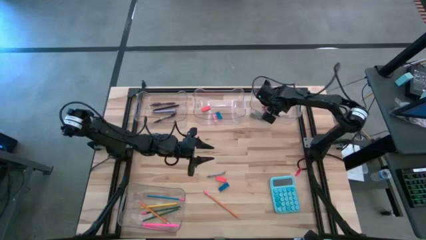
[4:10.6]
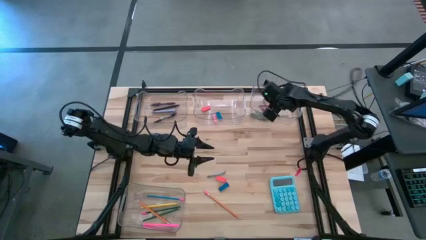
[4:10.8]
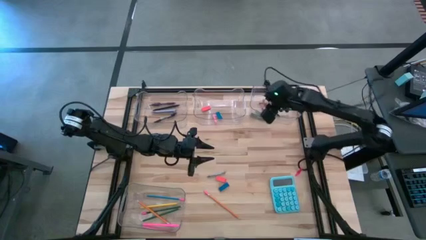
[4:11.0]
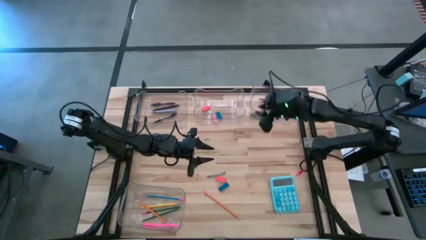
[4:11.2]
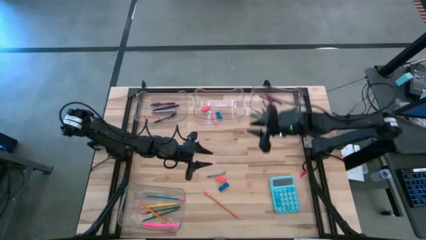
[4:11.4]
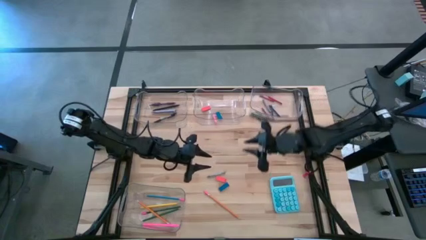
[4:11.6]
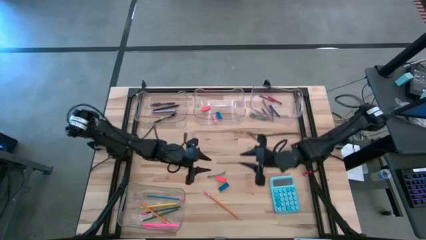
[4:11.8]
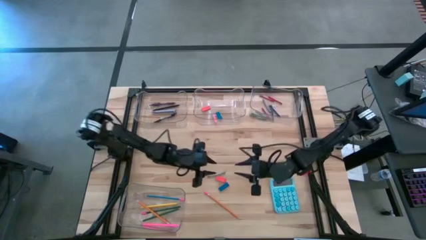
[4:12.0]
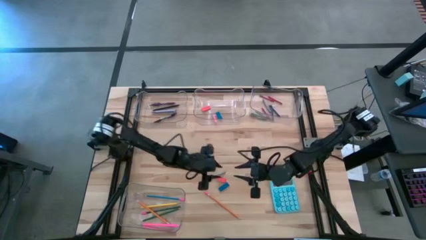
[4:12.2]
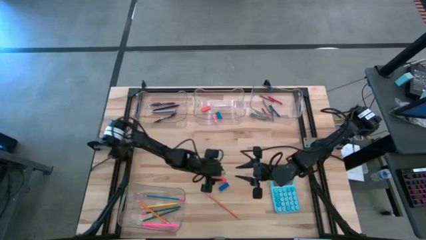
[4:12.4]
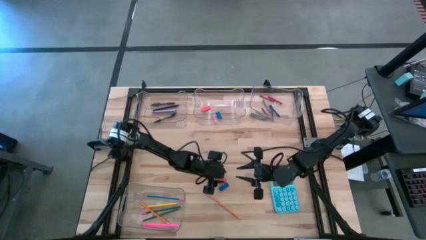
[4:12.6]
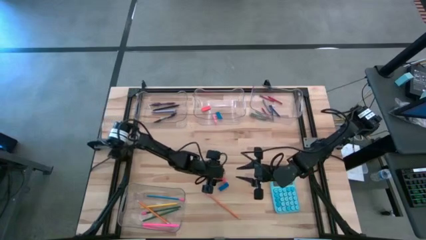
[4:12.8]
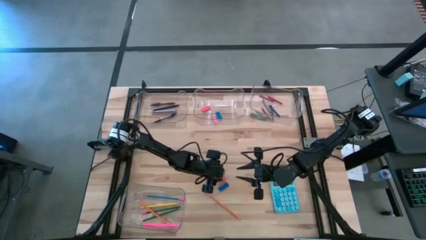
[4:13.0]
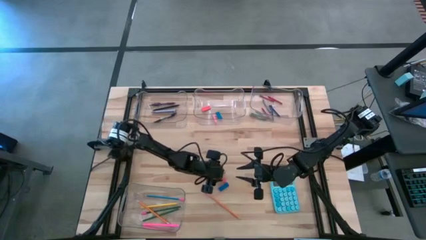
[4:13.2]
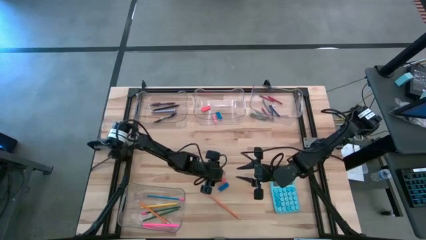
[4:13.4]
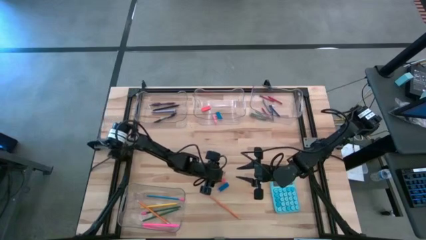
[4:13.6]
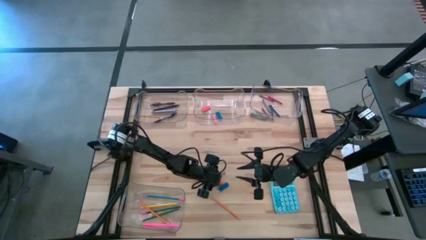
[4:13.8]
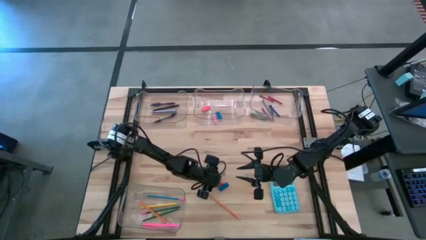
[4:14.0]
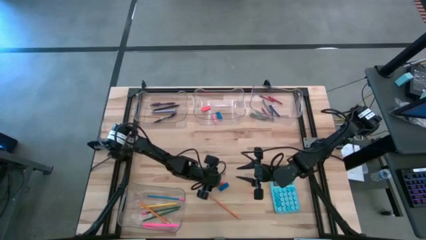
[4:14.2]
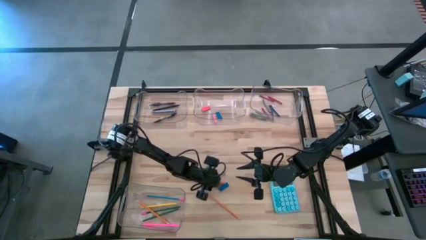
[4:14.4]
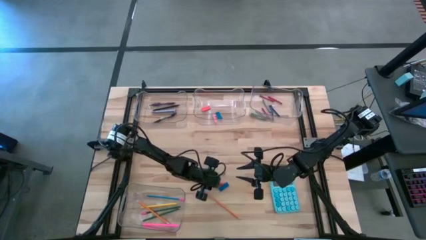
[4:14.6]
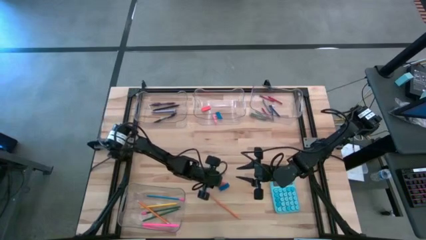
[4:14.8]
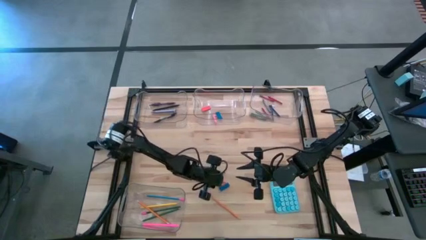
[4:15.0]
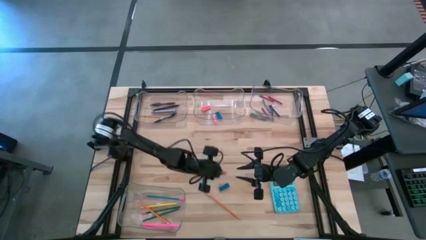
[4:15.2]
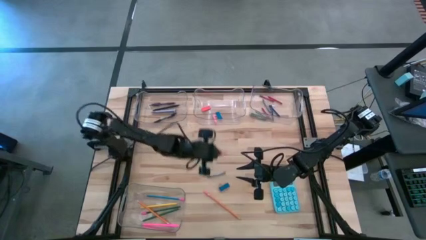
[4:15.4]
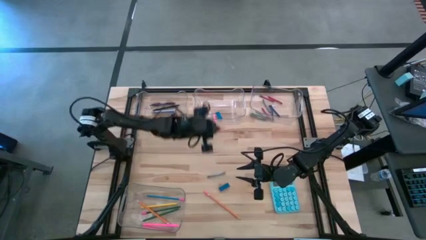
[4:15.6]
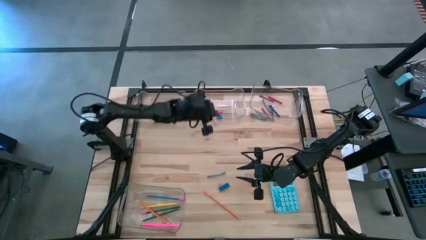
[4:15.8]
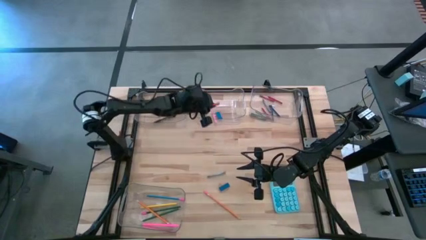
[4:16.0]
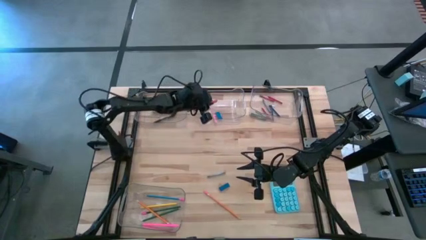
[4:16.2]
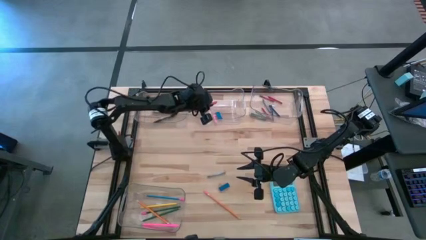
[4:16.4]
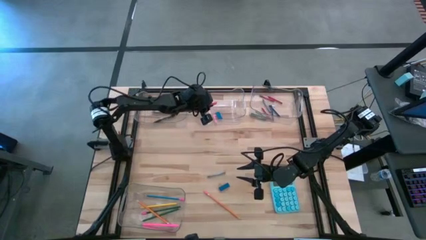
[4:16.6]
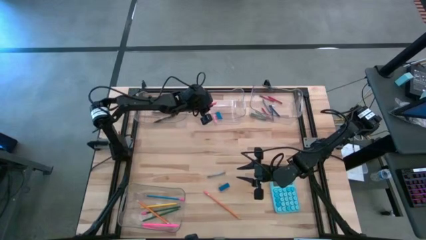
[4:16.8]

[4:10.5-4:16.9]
Task: Sort crayons/erasers/pens/pencils in bins
Put the orange eraser into the top middle transparent bin

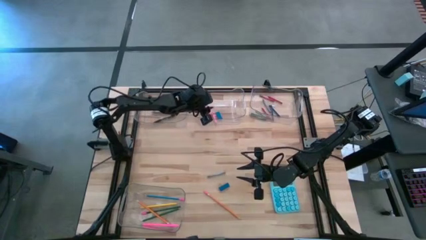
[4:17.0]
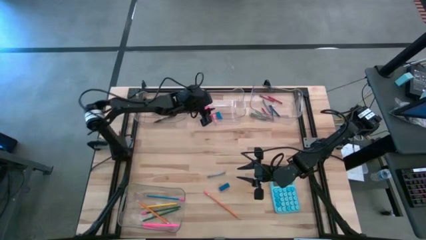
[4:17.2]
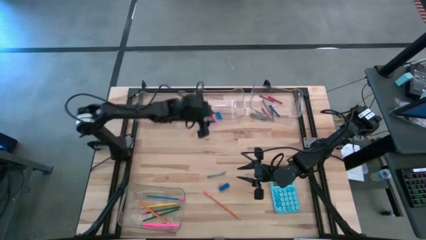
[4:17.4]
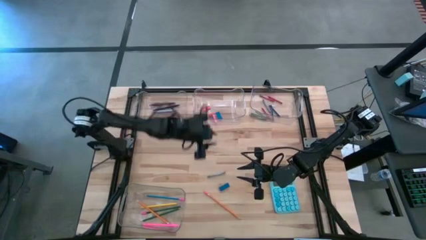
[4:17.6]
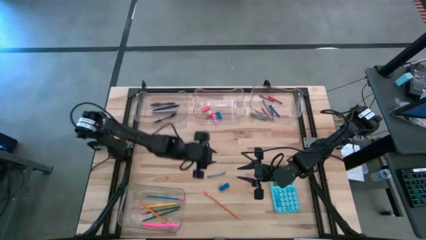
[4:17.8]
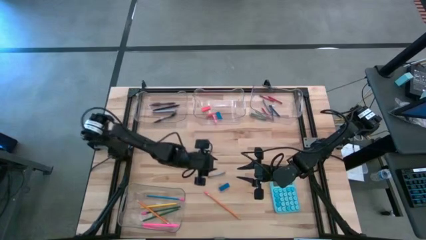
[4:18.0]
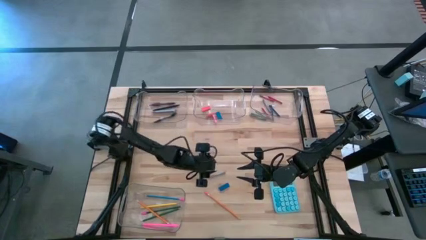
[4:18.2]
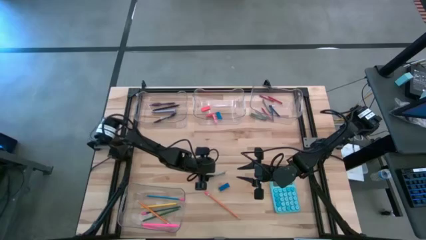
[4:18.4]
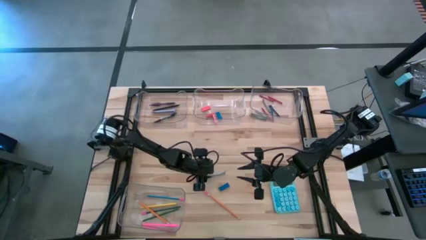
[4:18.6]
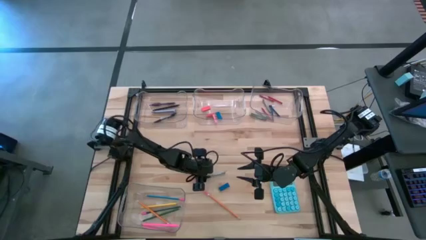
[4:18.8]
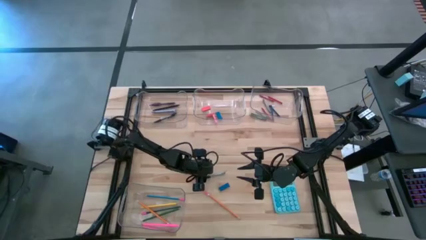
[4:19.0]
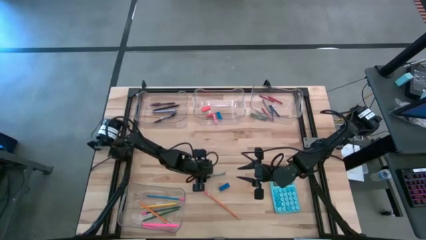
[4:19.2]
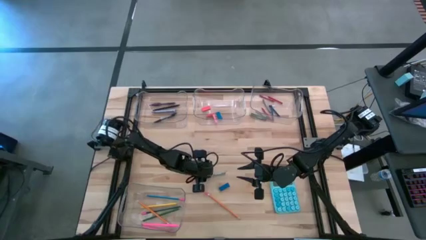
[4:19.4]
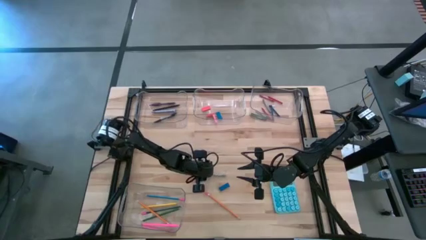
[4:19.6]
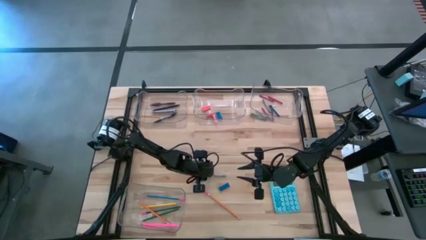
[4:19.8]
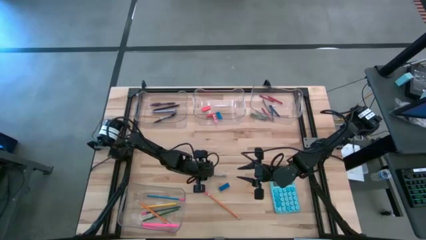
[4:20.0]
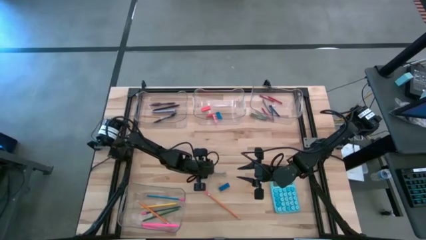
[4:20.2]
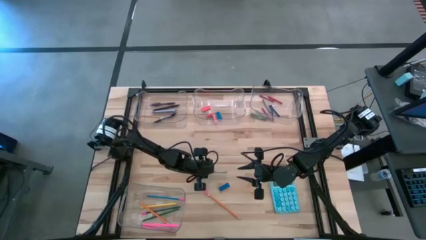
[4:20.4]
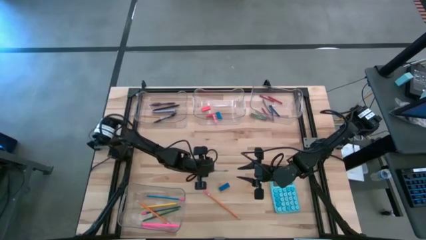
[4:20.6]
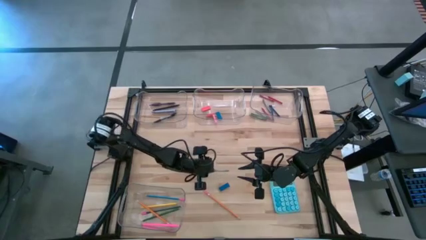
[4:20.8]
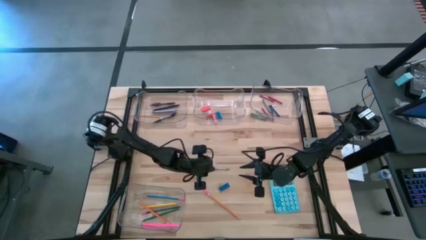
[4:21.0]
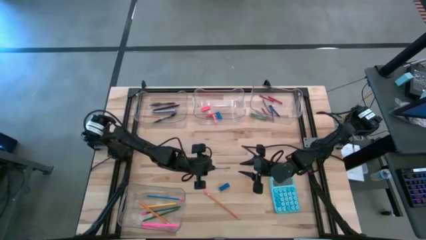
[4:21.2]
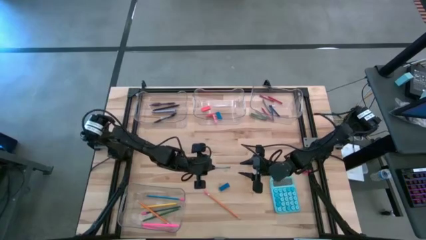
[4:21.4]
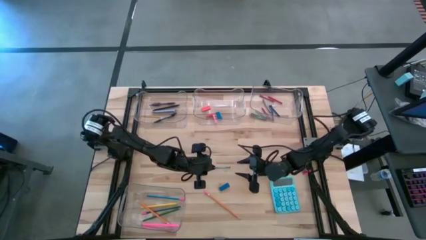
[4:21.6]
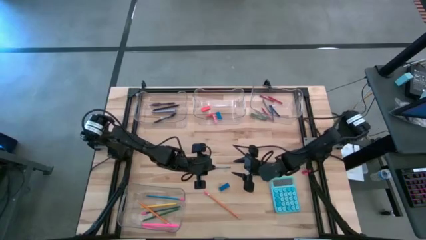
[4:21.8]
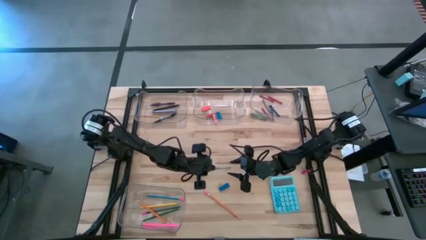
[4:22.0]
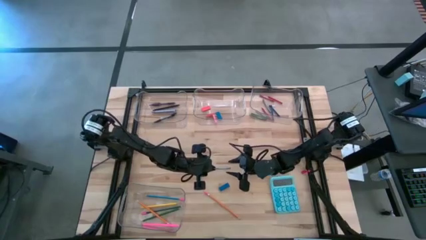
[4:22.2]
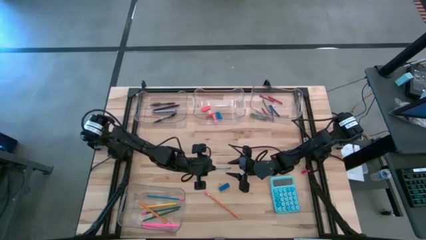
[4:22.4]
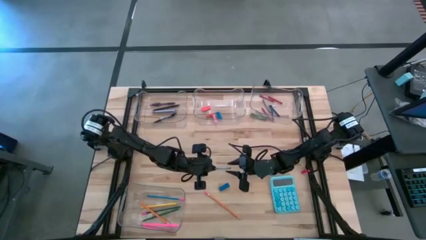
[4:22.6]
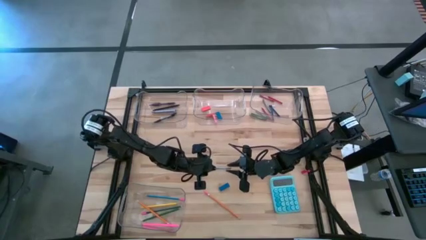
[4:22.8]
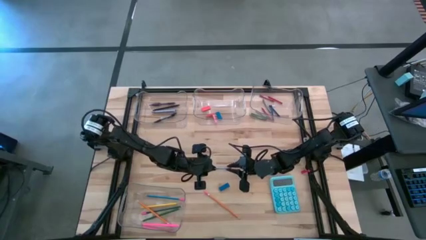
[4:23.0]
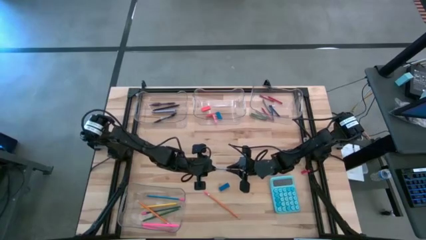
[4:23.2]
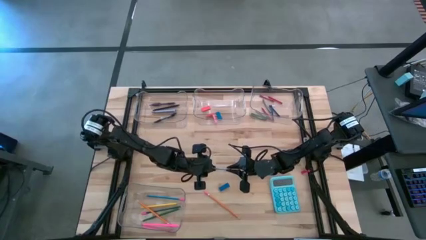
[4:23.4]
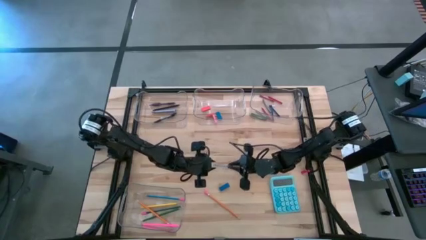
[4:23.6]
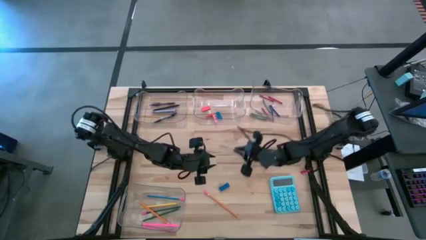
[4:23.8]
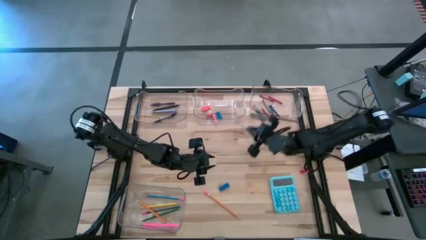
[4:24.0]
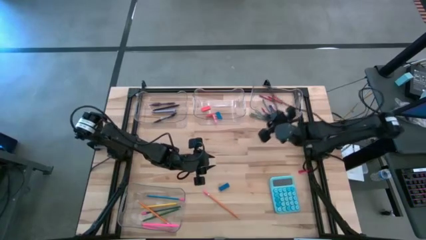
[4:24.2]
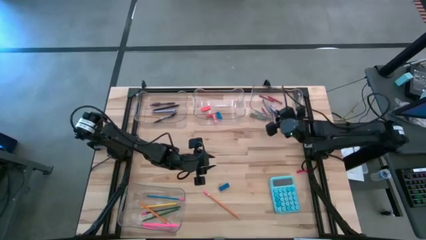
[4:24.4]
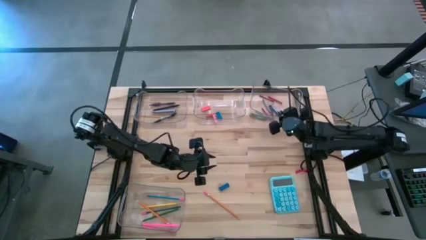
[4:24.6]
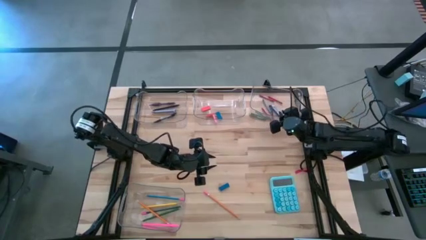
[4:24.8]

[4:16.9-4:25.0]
Put the gray crayon into the top right transparent bin

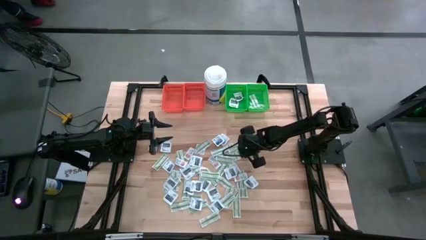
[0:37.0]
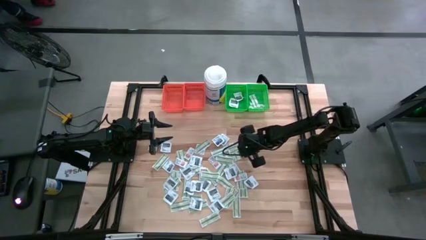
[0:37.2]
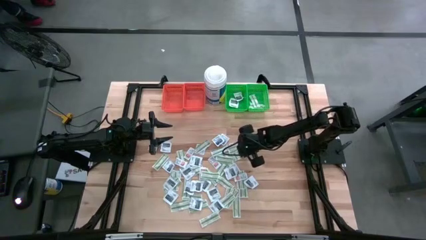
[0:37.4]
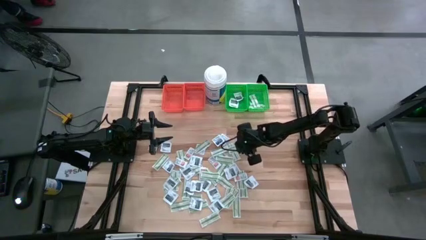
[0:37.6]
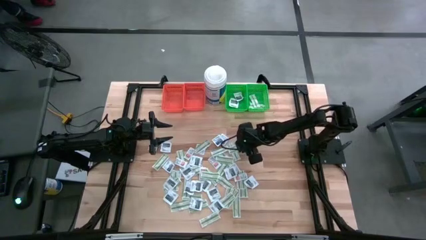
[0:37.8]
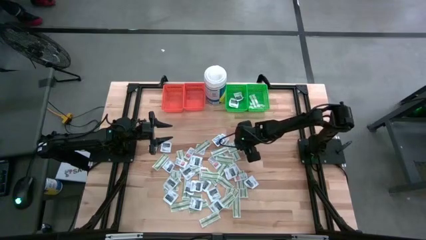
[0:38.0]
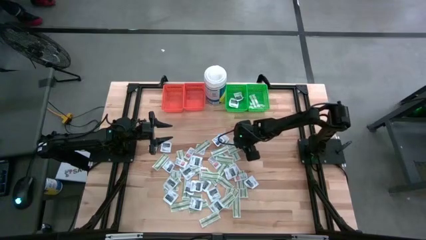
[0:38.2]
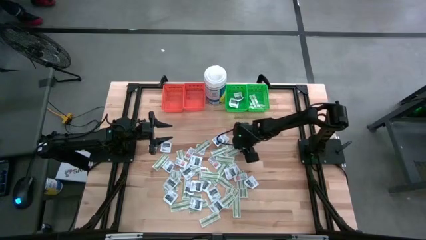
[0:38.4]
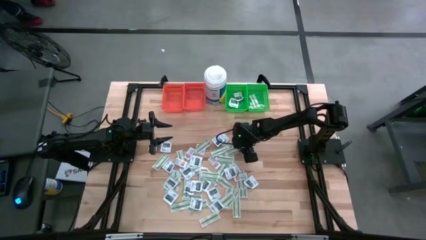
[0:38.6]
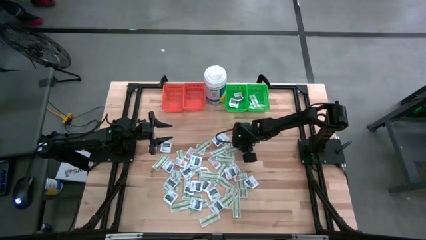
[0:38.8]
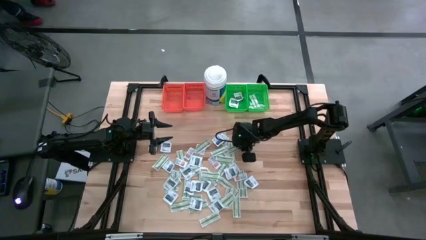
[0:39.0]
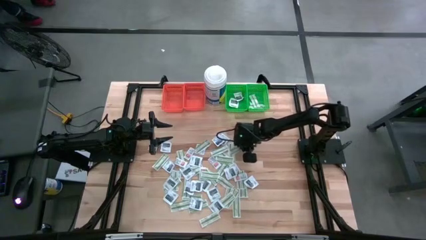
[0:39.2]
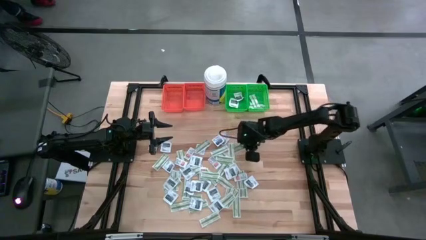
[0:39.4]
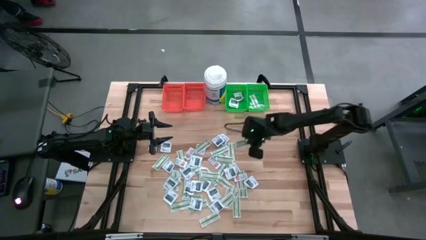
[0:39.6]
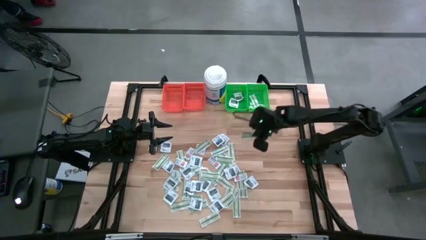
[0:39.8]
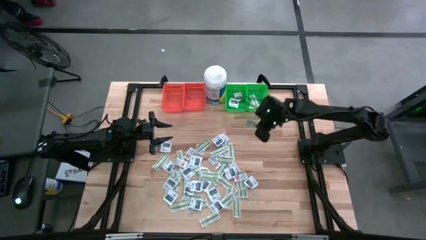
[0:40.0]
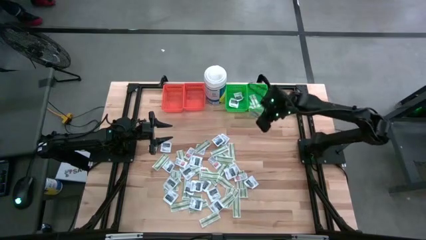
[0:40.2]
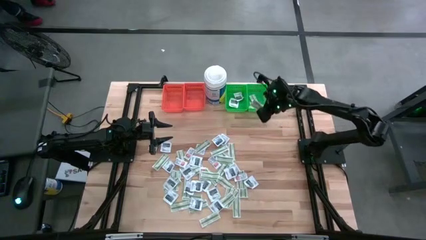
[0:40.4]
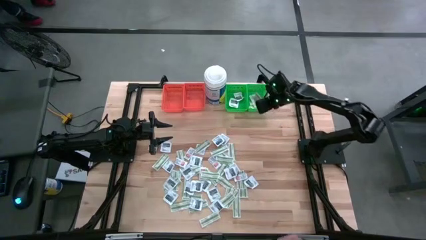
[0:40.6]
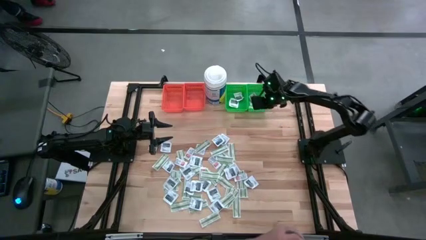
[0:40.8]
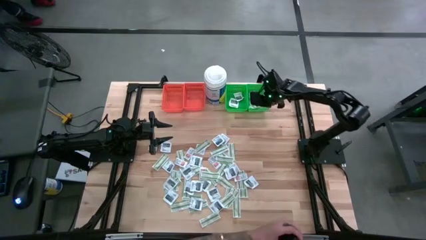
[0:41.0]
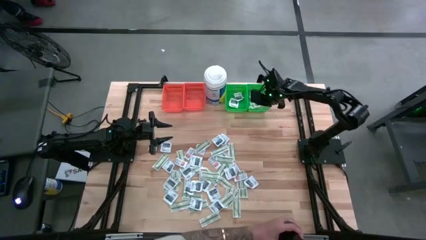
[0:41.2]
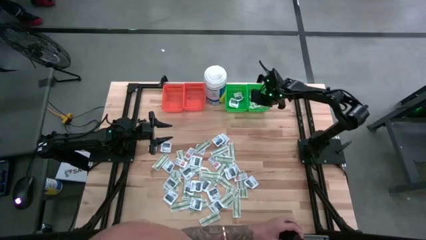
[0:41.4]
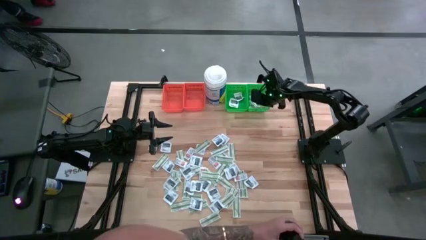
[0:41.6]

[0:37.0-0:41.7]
Task: Pick & Place First Aid Supplies
Put the green bandage pack into the right green bin
